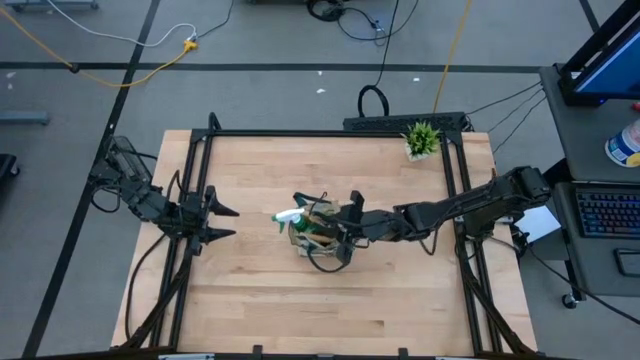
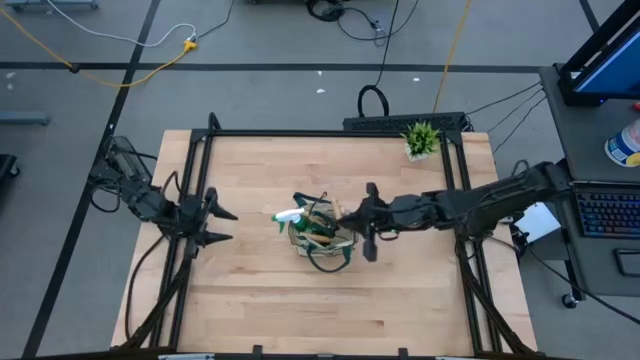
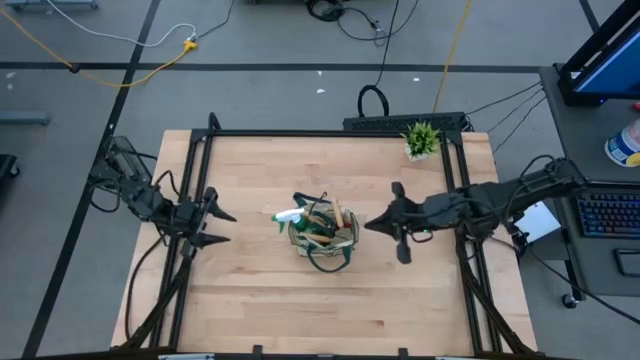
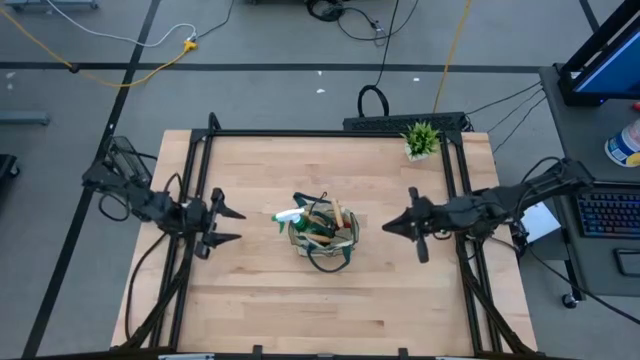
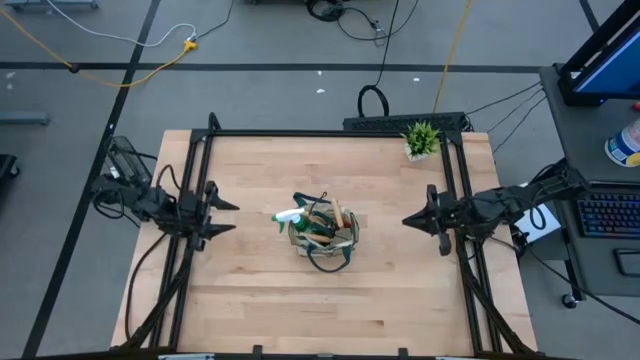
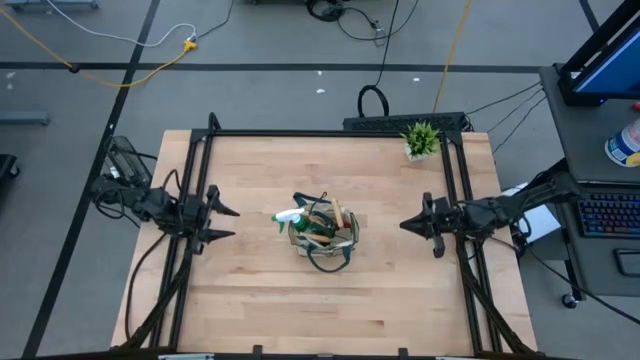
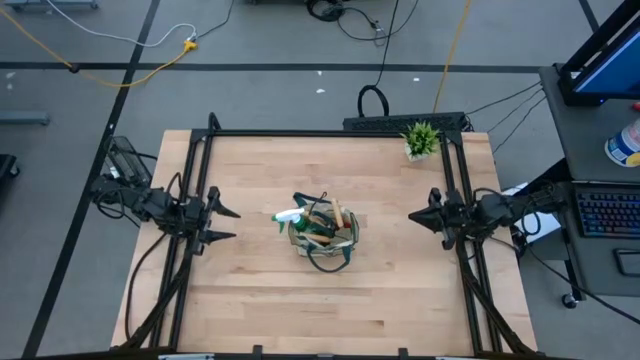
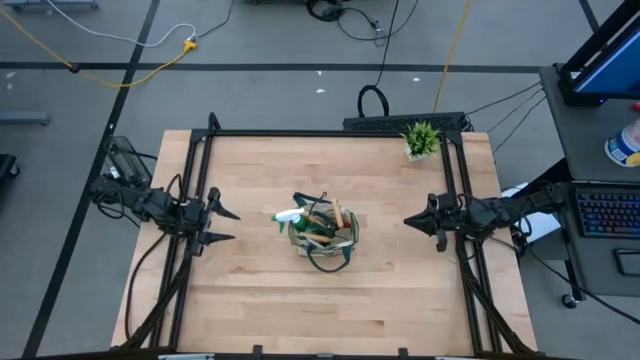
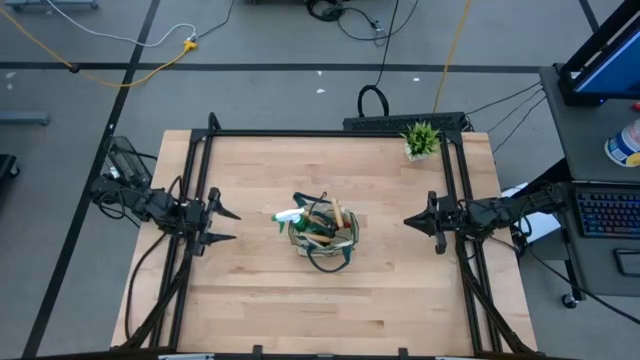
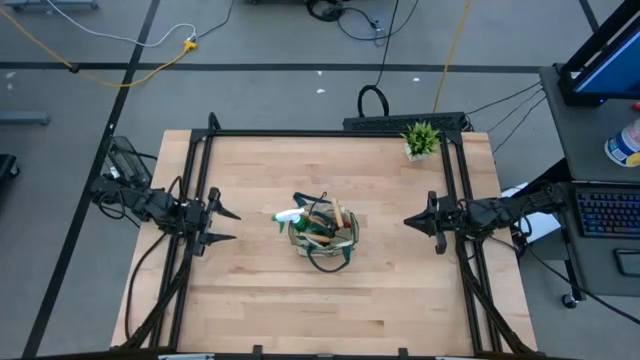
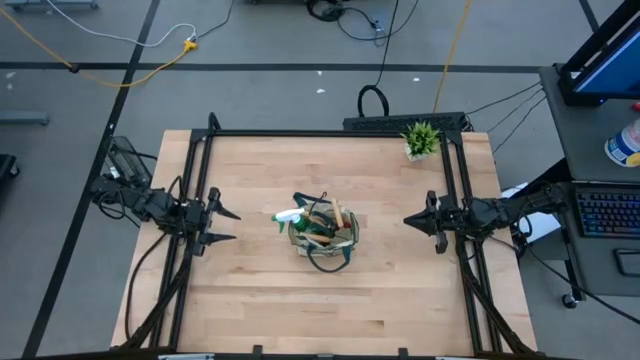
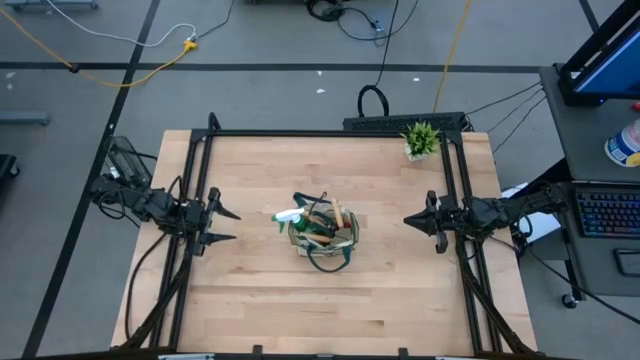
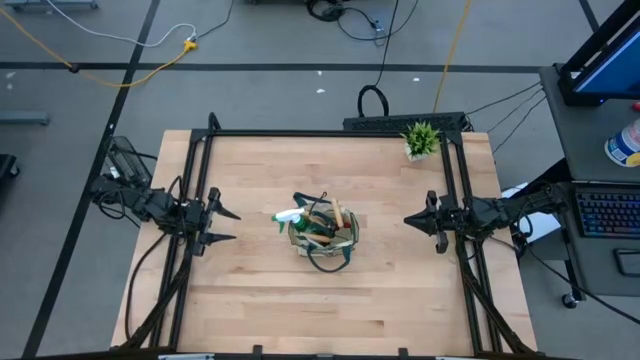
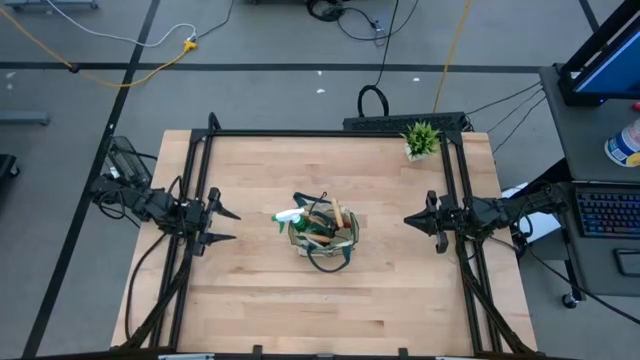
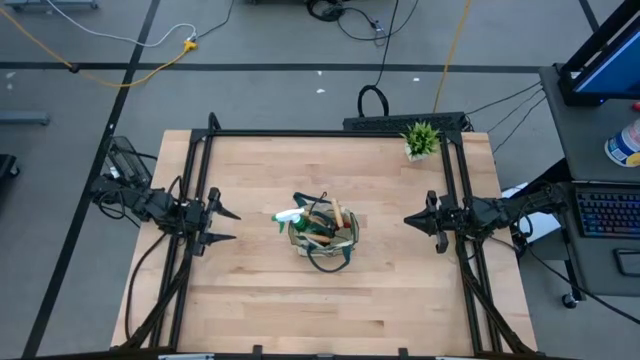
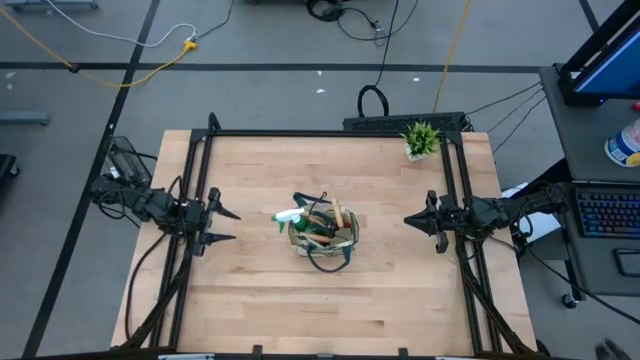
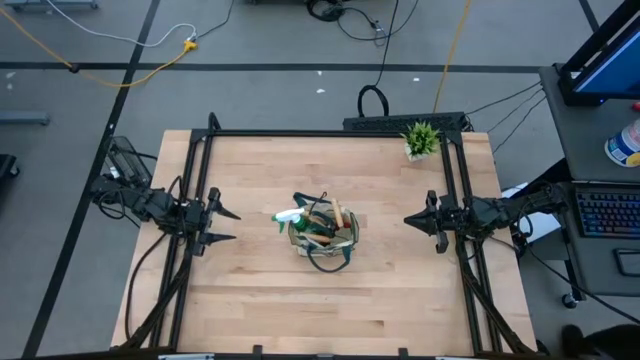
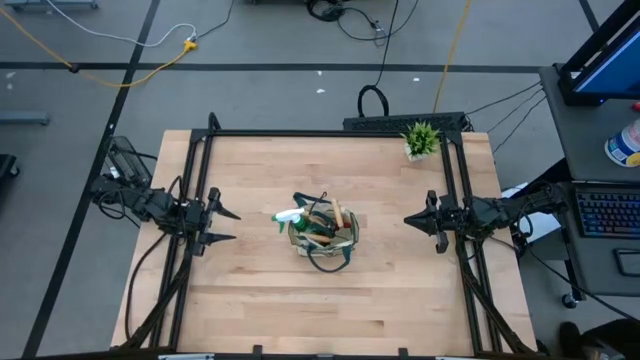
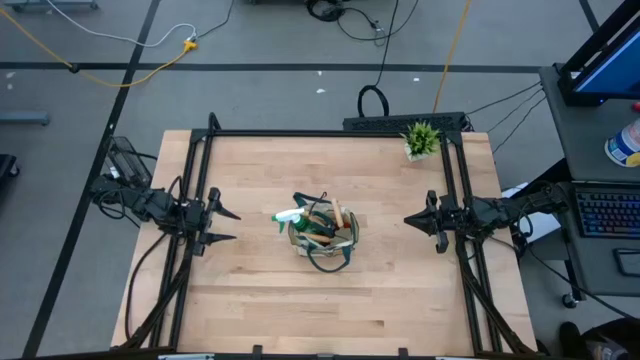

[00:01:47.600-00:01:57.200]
Task: Pick & Place Garden tools in Gardening bag
Return to Home Position

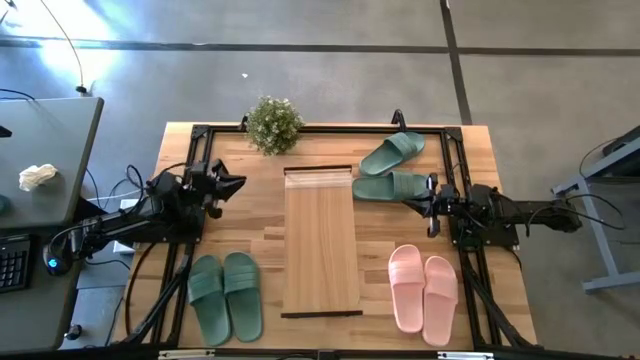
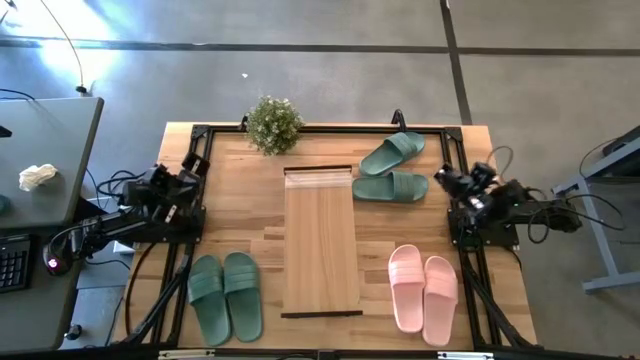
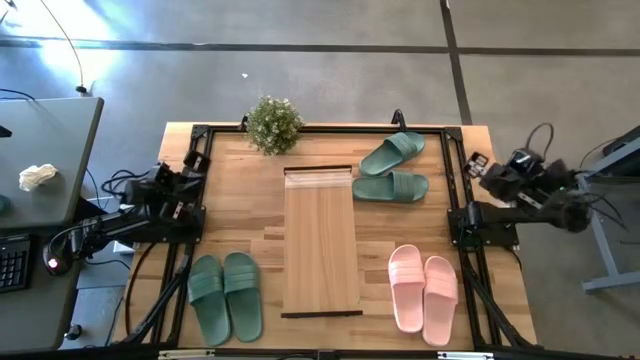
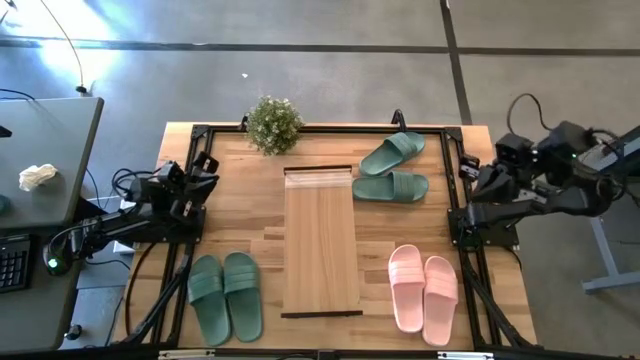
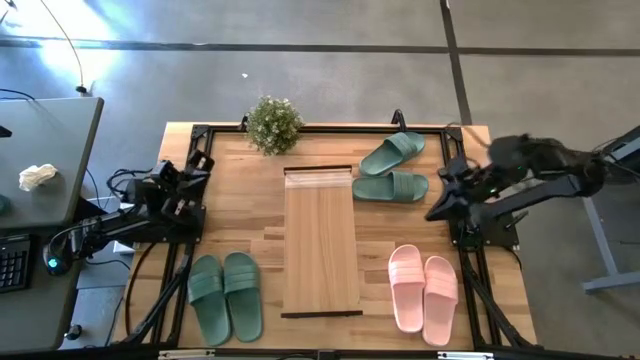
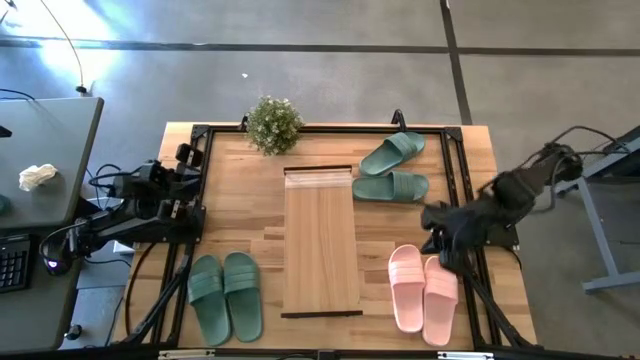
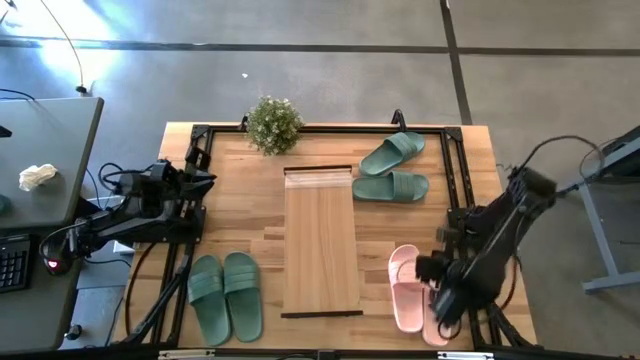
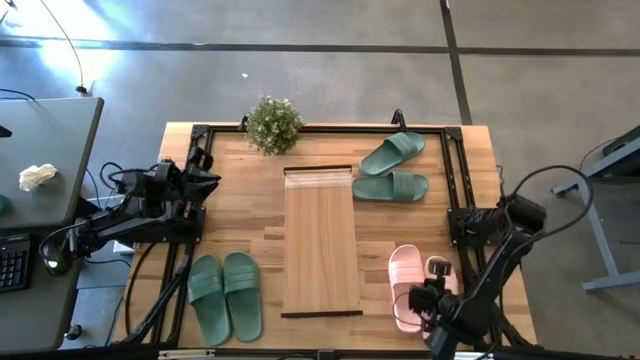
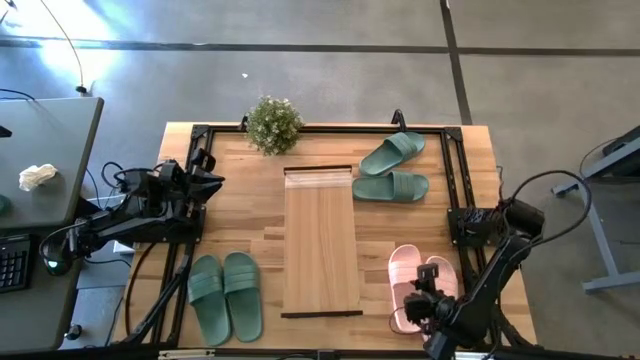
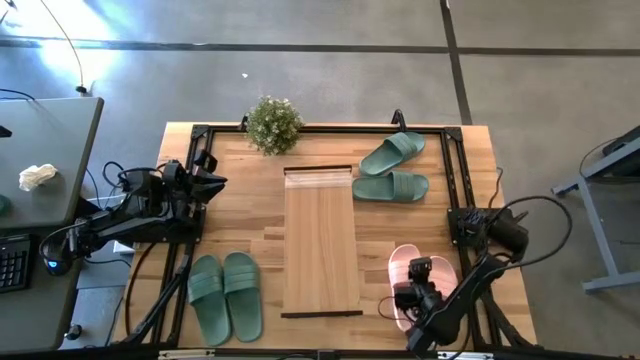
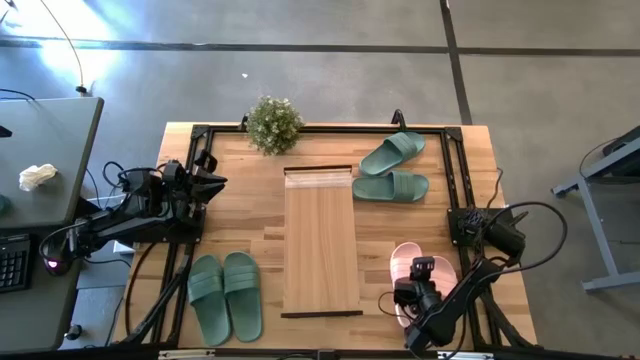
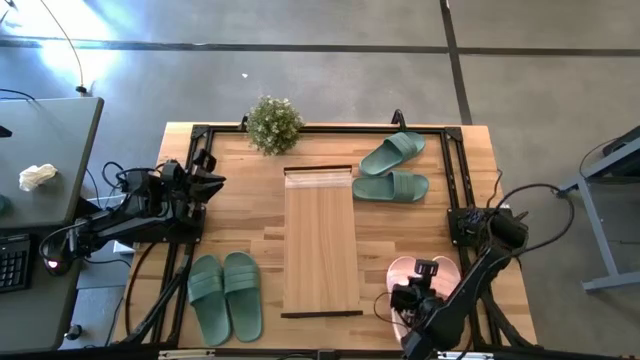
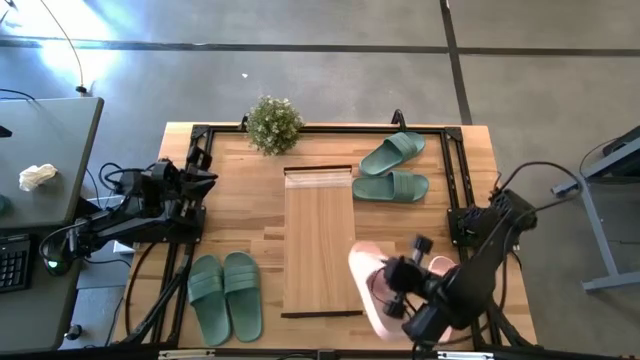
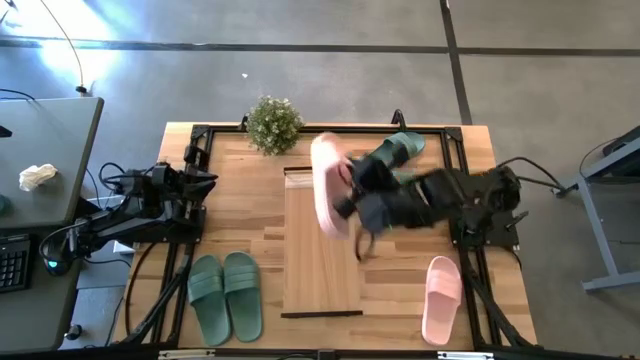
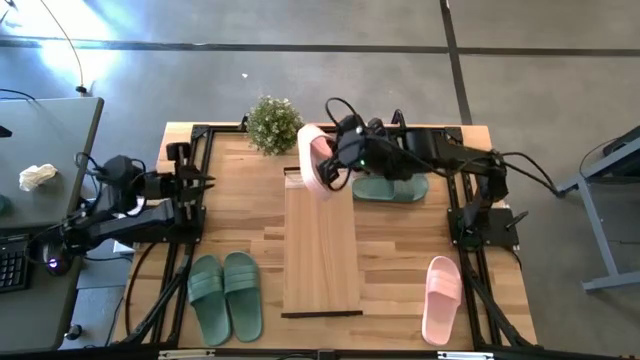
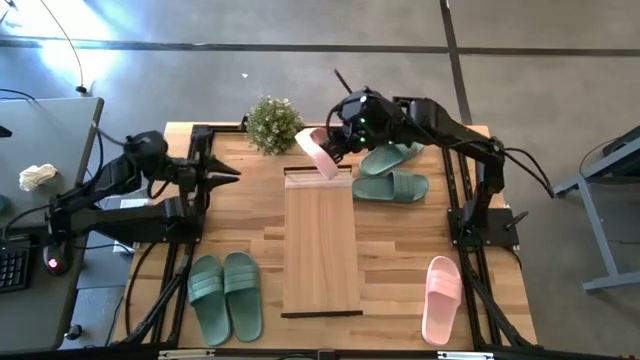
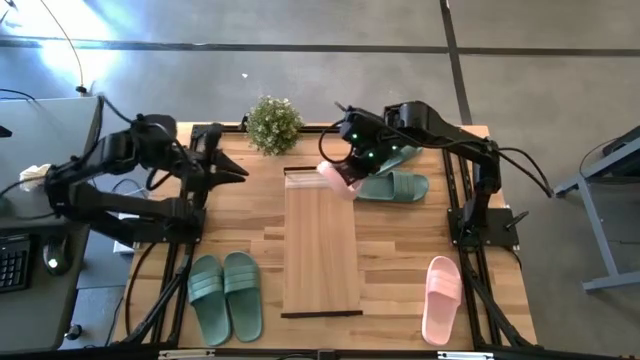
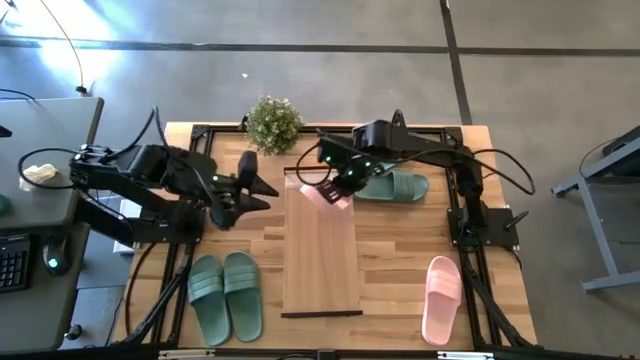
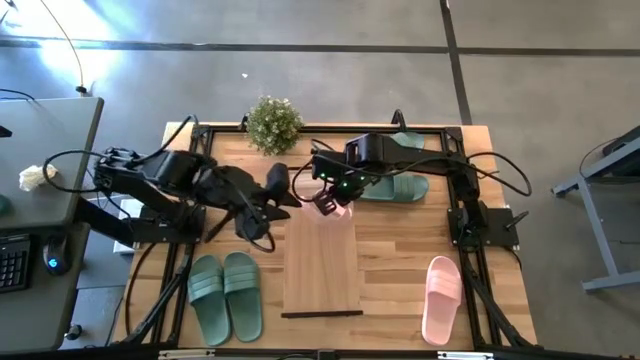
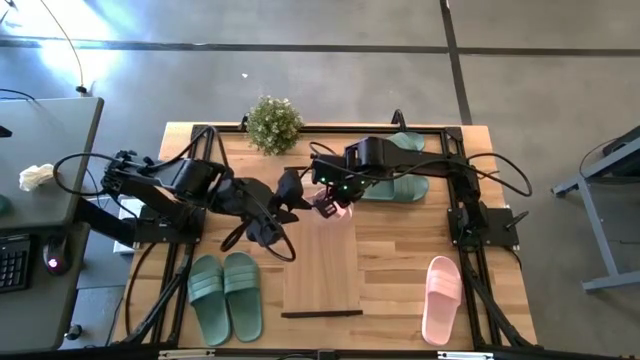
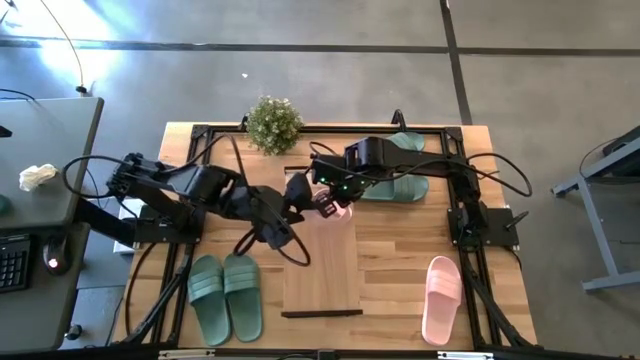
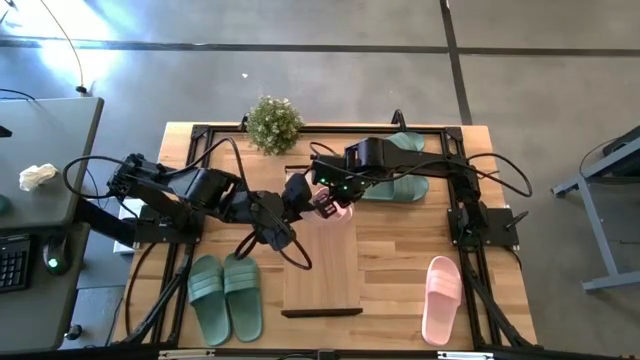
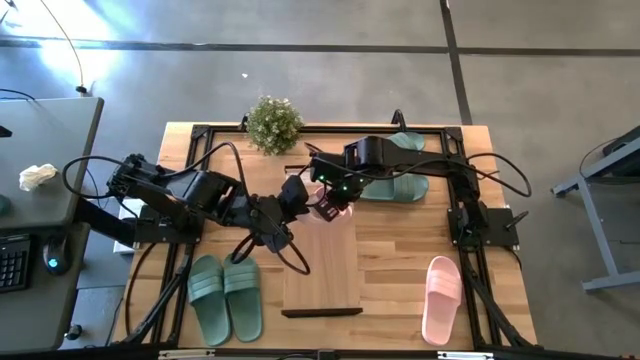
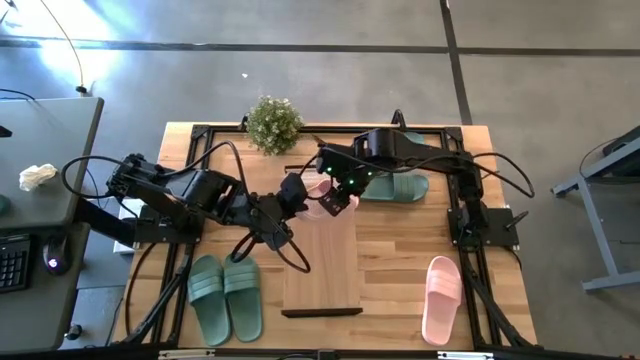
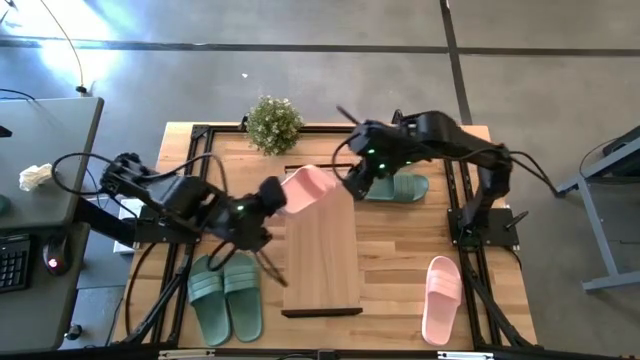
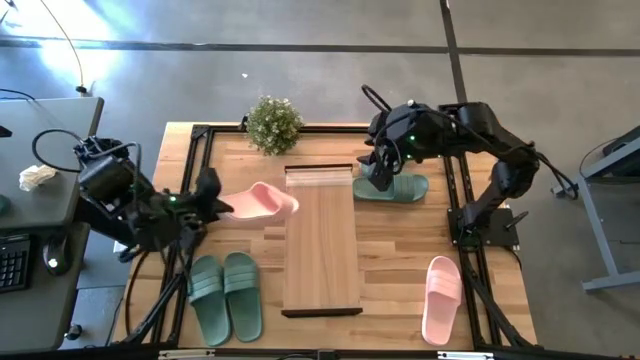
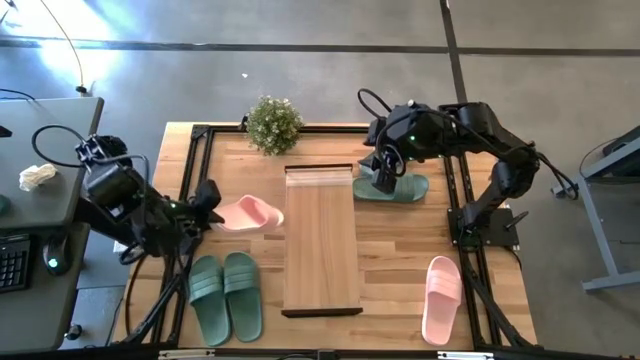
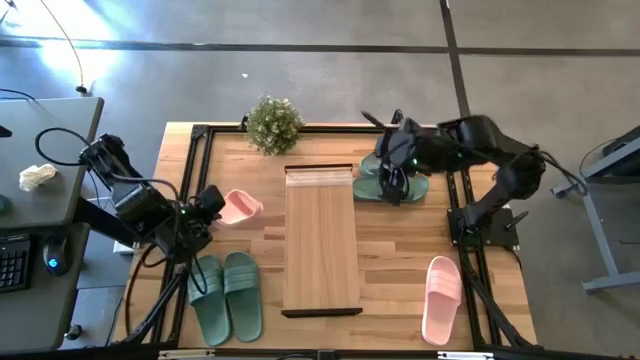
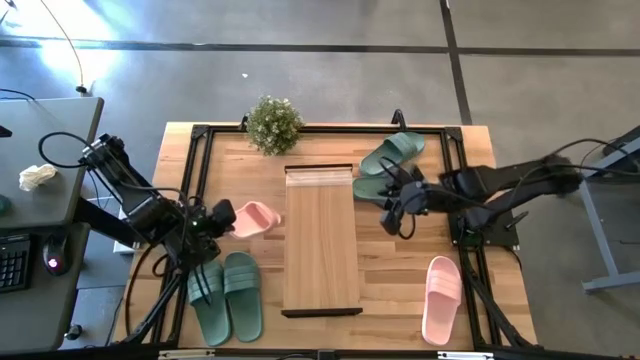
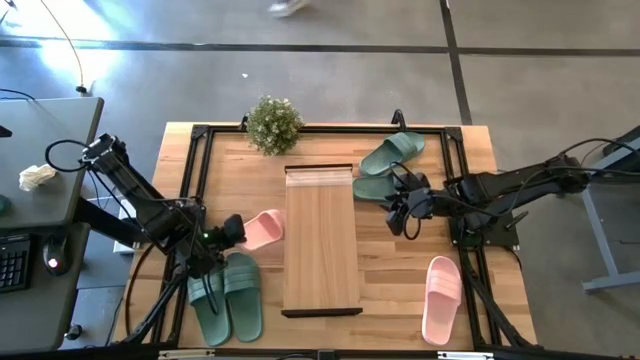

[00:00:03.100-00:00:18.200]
Task: Pick and place slides into the shelf
Put the left pink slide under the shelf
